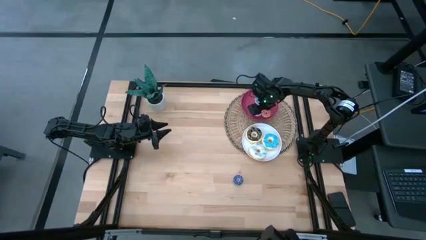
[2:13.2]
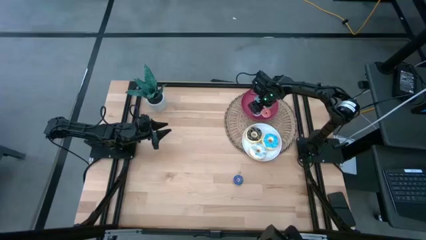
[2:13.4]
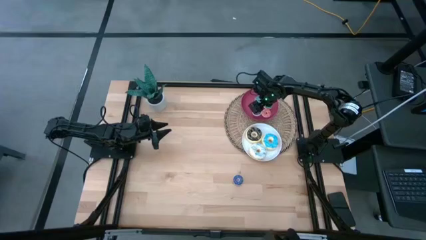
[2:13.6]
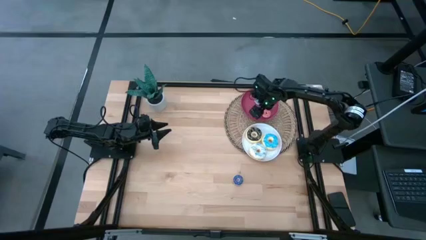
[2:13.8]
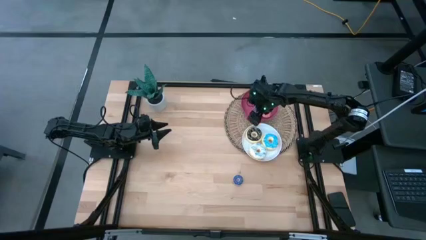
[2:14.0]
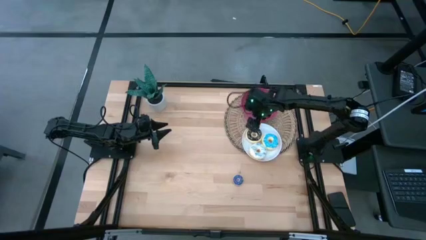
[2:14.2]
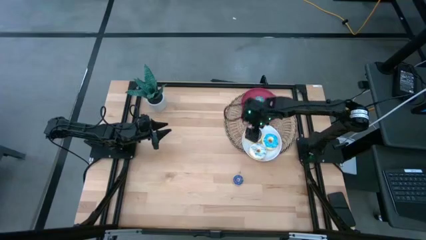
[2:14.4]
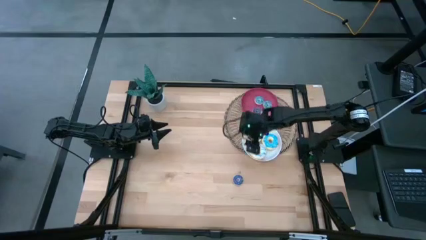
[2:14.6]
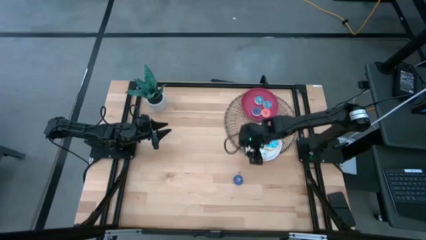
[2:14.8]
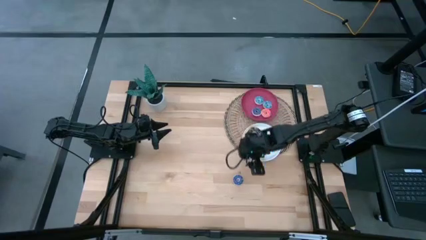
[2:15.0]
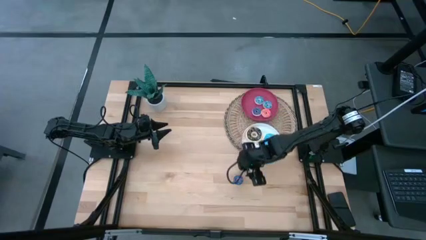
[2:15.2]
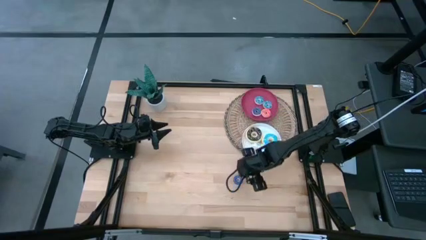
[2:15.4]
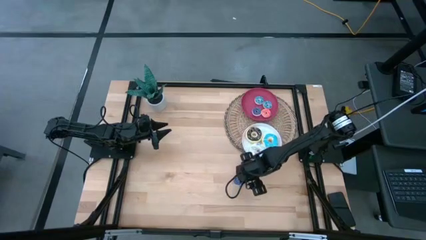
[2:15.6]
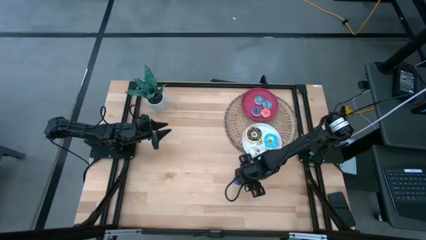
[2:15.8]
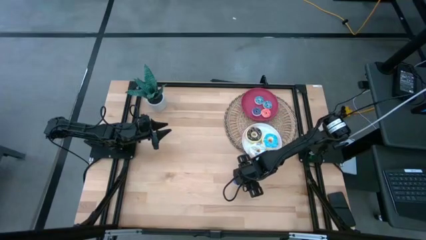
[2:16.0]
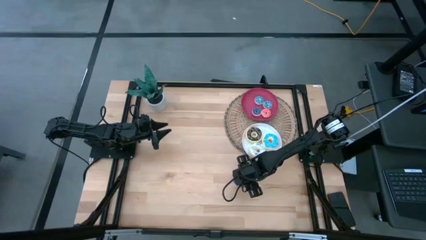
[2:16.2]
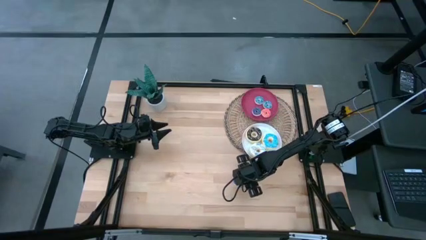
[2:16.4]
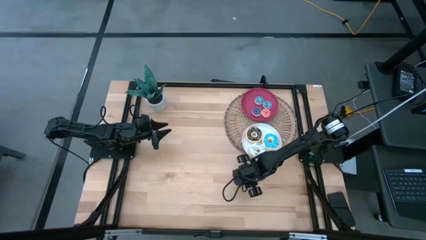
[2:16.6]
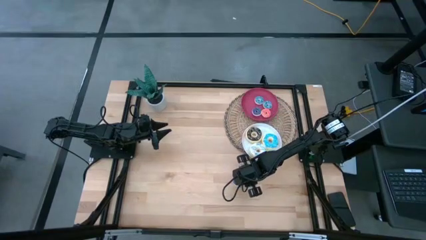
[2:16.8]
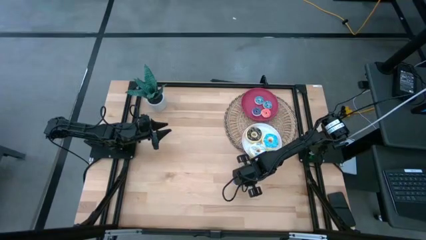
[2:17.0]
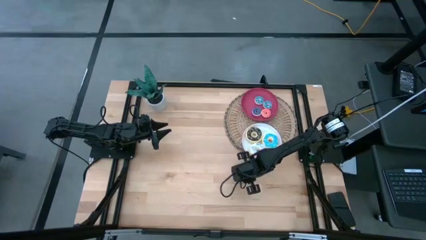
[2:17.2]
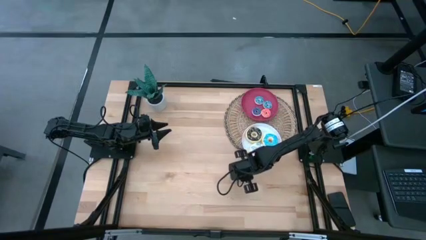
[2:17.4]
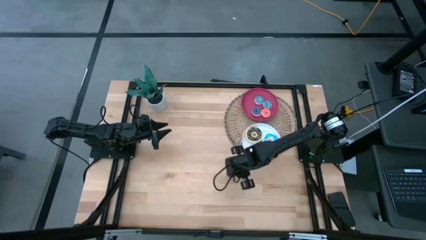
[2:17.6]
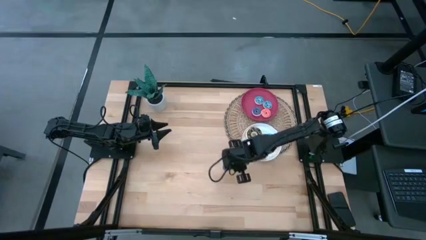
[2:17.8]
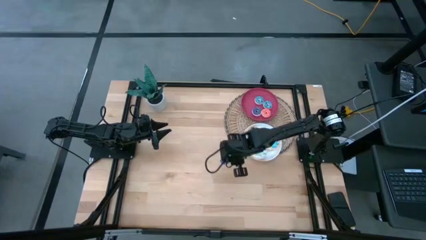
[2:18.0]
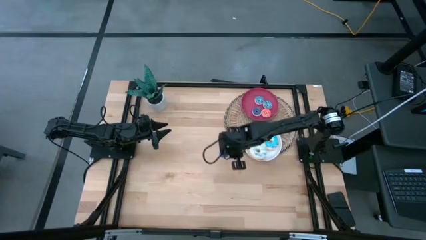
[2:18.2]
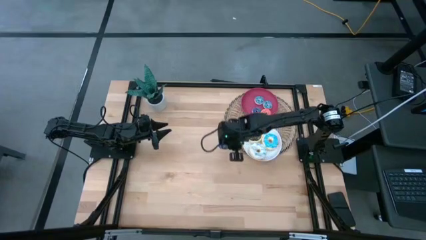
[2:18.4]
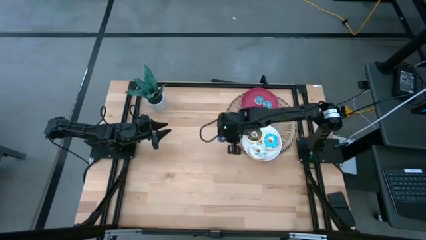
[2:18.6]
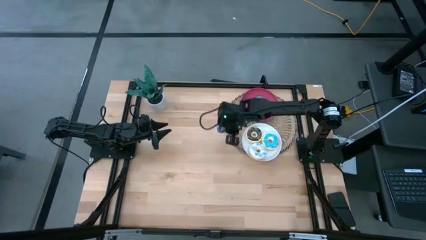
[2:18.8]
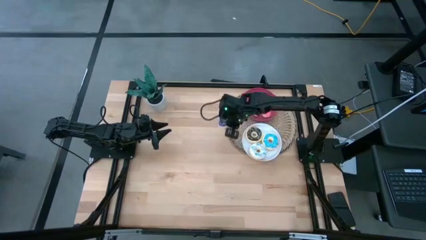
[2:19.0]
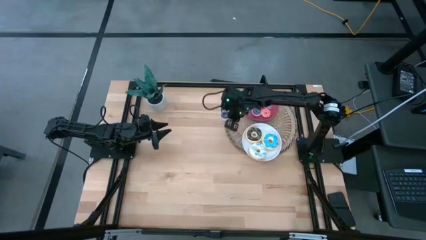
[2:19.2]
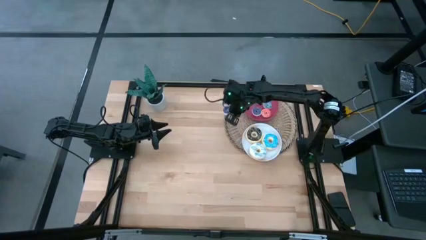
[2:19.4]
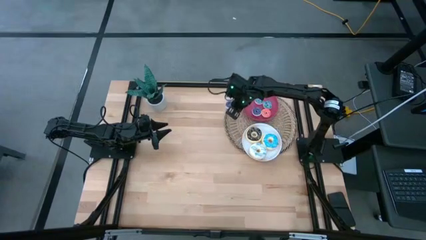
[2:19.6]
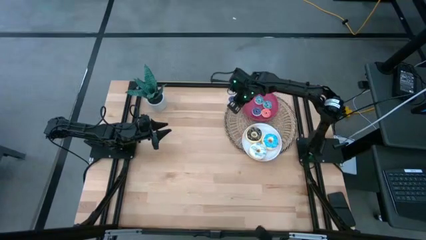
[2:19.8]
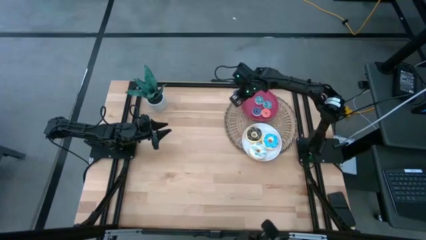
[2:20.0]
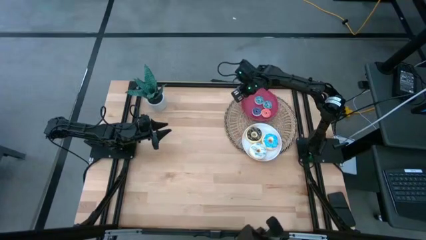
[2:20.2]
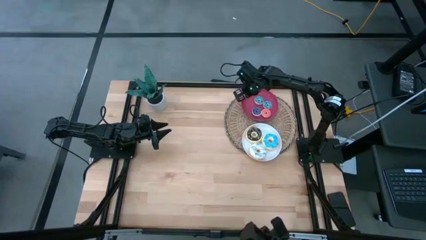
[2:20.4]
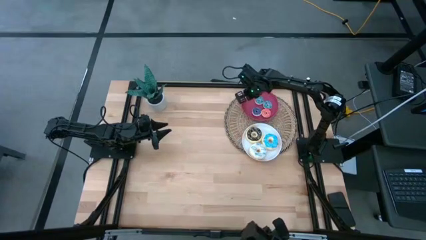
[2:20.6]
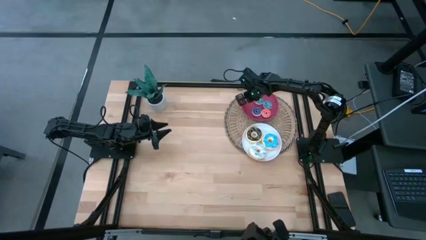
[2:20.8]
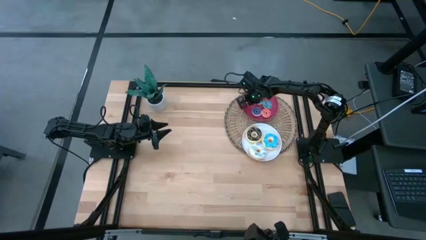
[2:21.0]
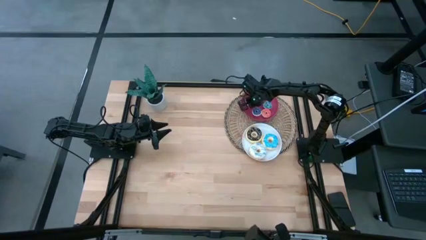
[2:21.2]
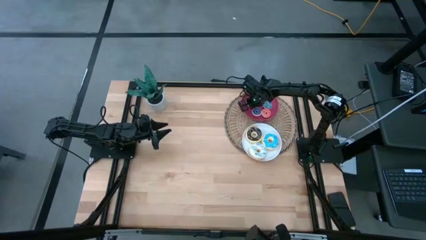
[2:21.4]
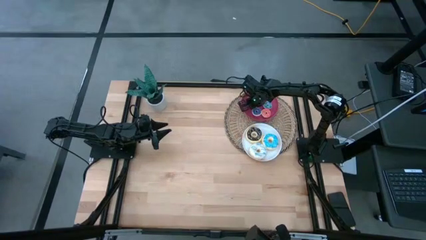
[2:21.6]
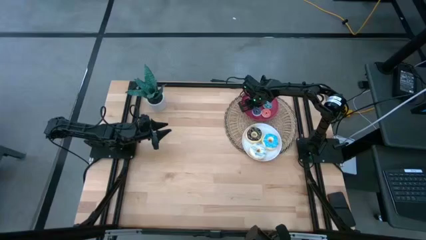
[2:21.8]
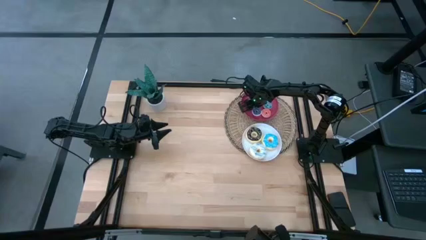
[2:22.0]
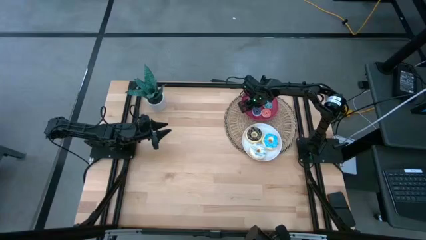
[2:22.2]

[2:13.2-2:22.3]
Task: Pick & Place donuts
Put the small dark blue donut on the red plate

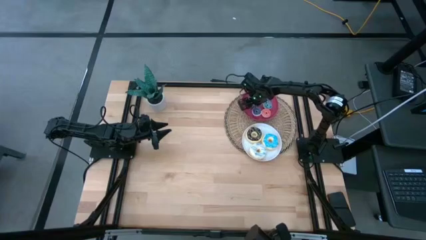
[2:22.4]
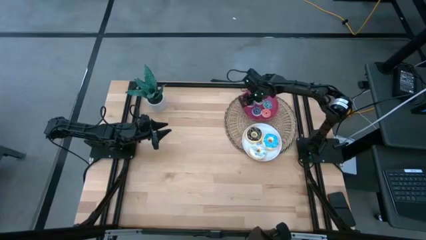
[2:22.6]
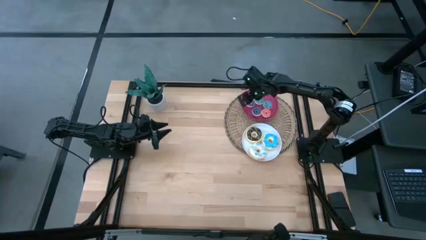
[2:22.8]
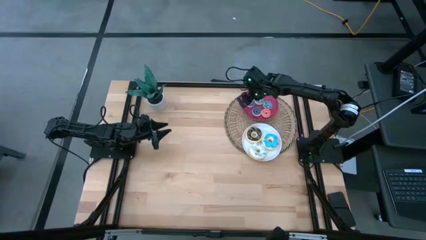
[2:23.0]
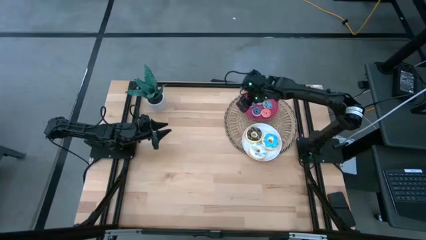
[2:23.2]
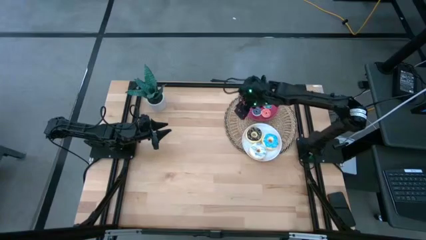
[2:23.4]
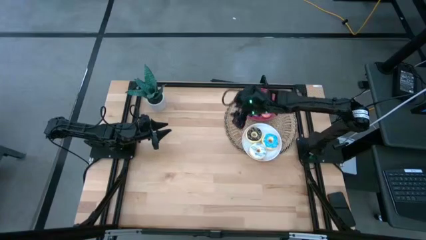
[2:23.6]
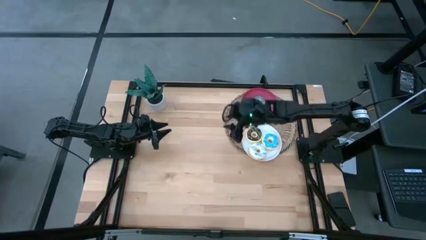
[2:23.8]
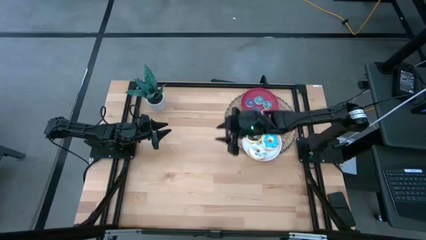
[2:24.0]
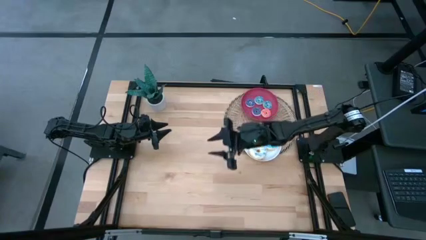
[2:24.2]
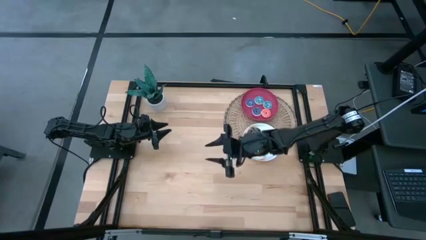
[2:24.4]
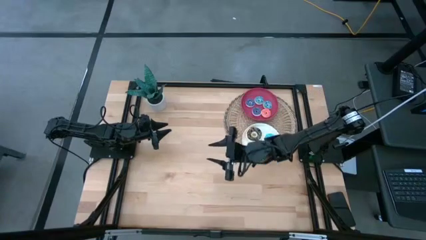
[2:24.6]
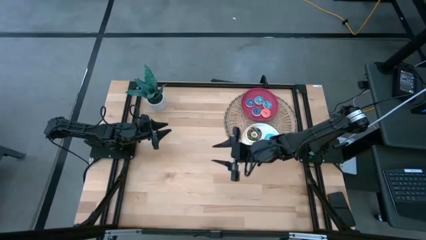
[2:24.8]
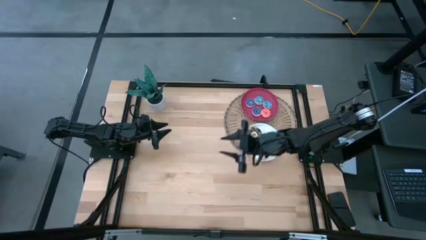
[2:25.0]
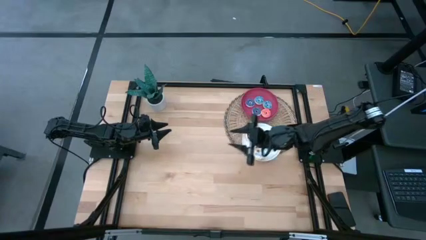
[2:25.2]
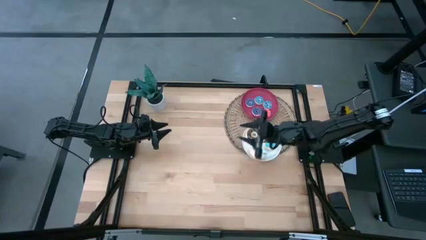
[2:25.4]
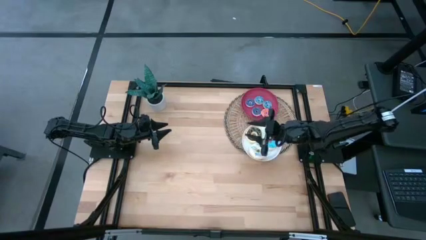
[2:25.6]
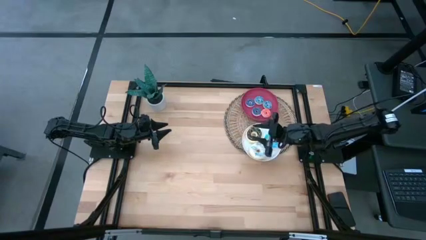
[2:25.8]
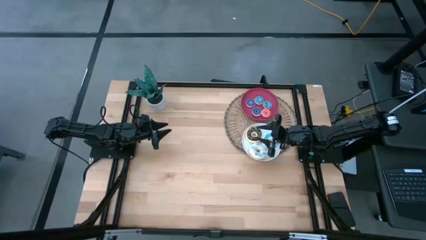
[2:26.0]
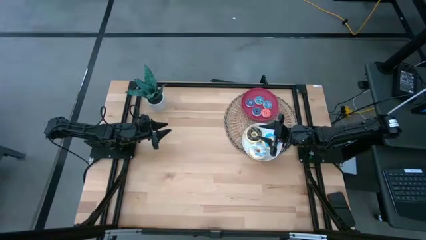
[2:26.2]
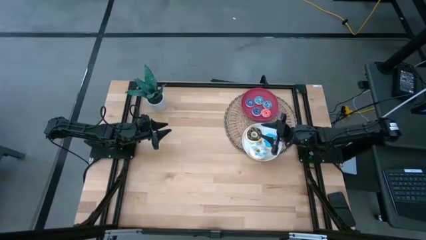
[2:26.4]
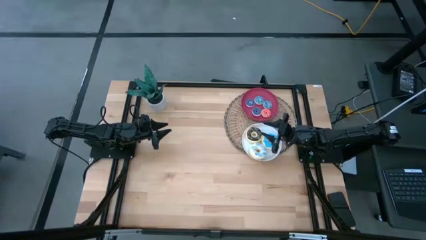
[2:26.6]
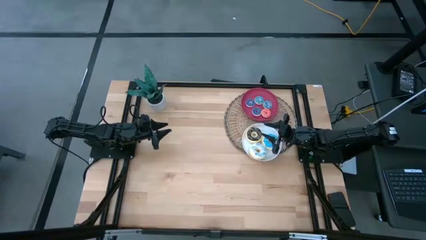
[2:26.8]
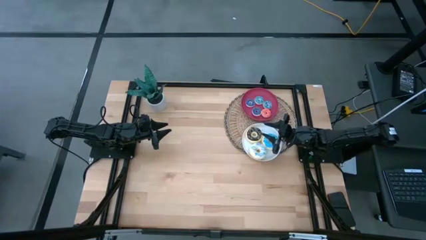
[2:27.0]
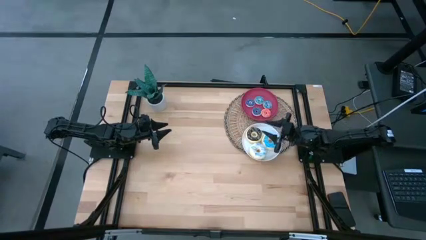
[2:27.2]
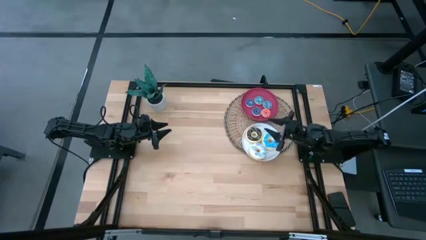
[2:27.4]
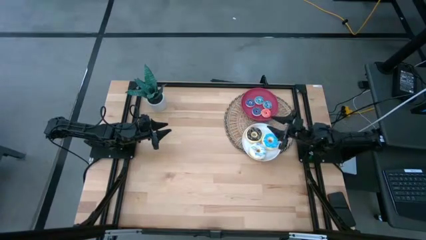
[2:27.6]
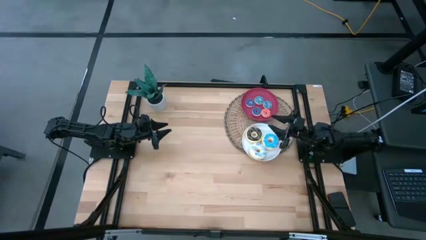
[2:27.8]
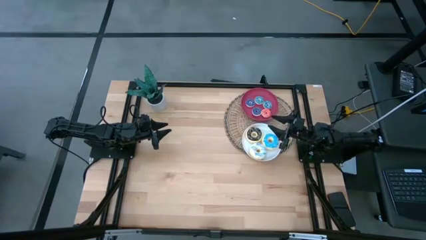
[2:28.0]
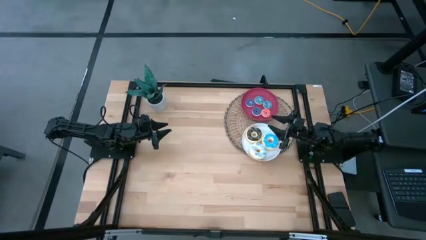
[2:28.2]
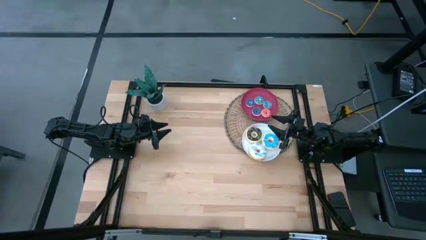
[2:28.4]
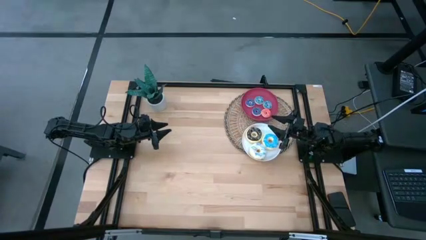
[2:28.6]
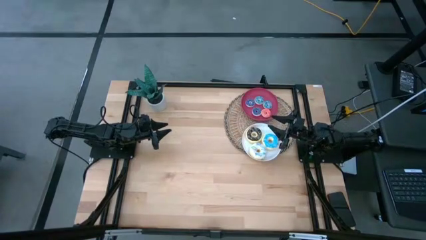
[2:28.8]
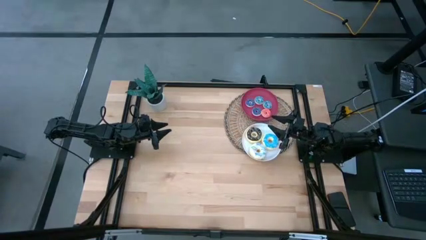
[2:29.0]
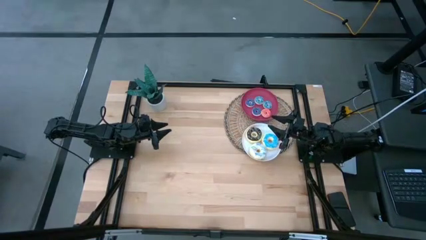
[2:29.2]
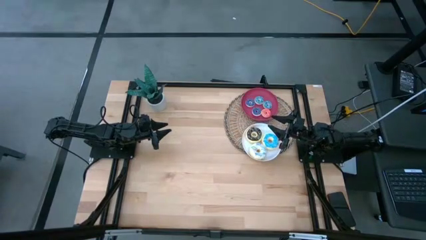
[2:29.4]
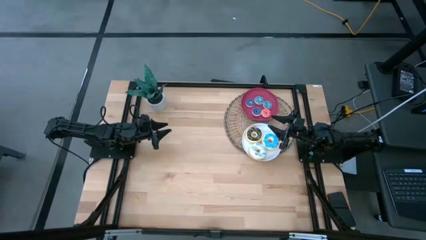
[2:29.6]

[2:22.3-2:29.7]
Return to home position
